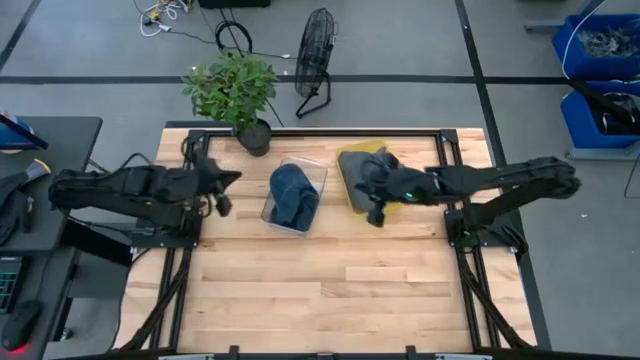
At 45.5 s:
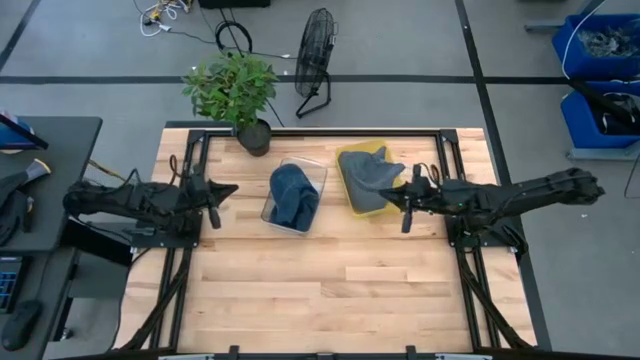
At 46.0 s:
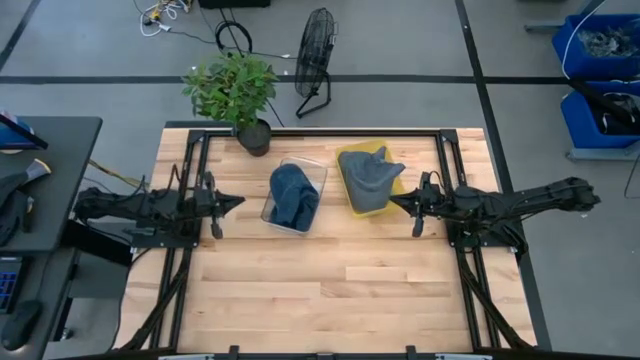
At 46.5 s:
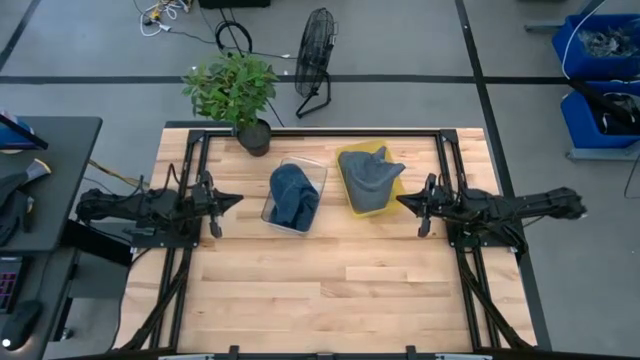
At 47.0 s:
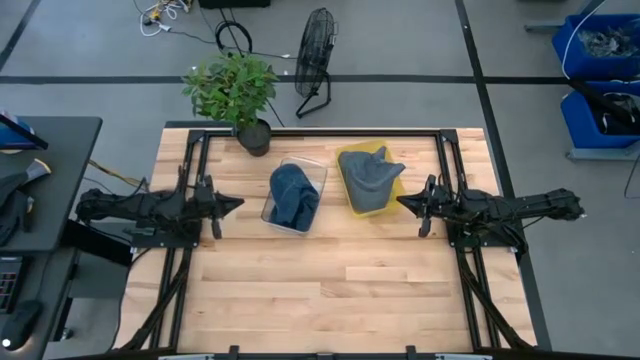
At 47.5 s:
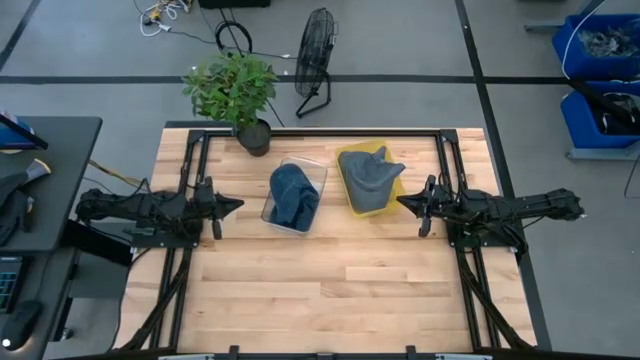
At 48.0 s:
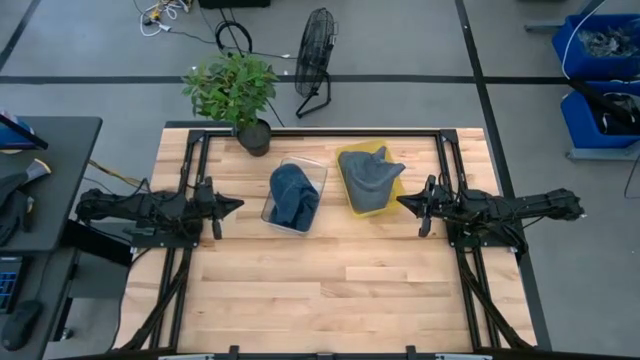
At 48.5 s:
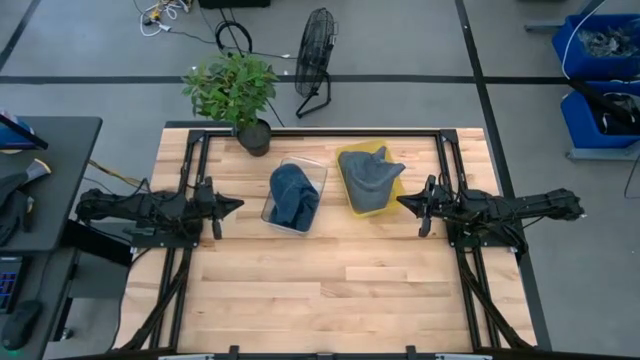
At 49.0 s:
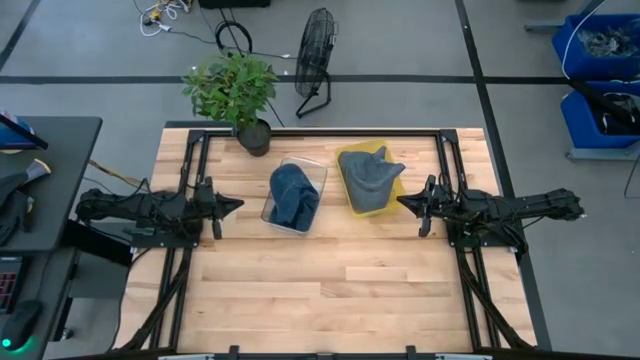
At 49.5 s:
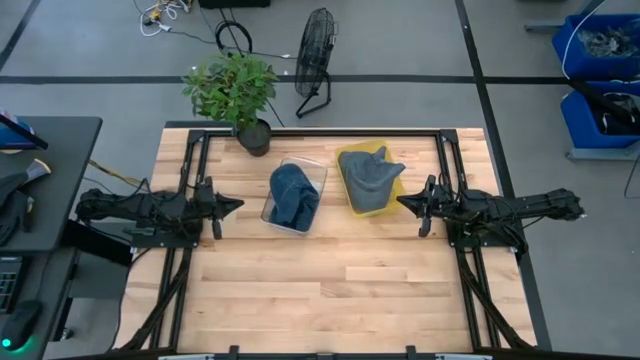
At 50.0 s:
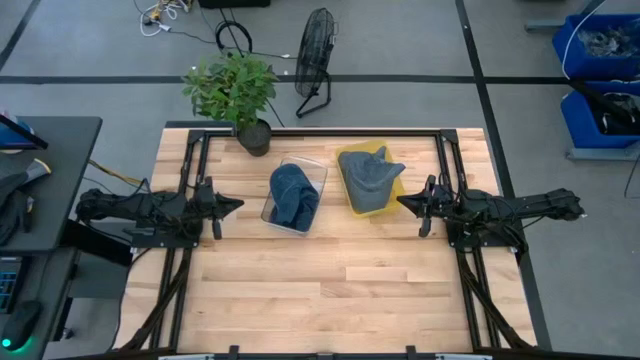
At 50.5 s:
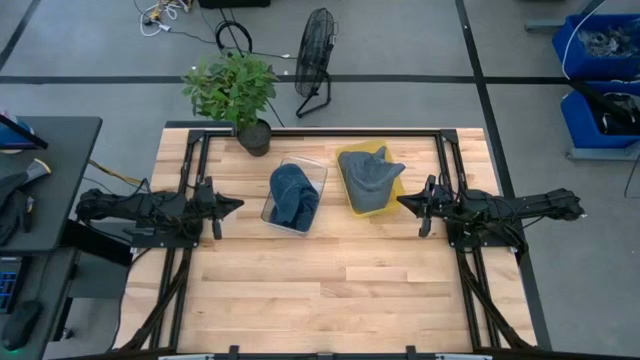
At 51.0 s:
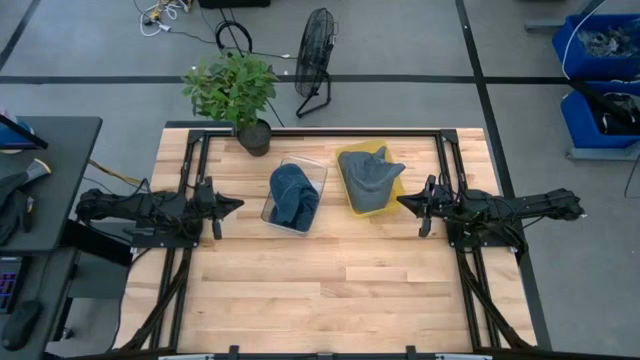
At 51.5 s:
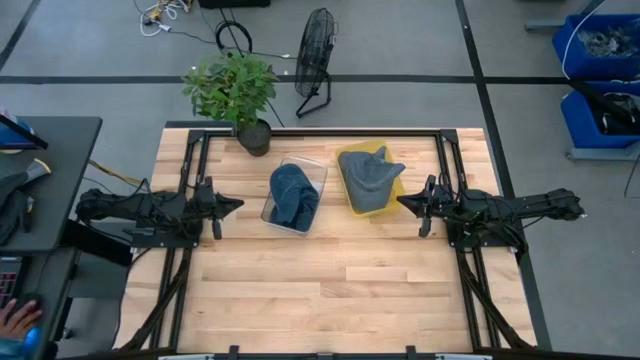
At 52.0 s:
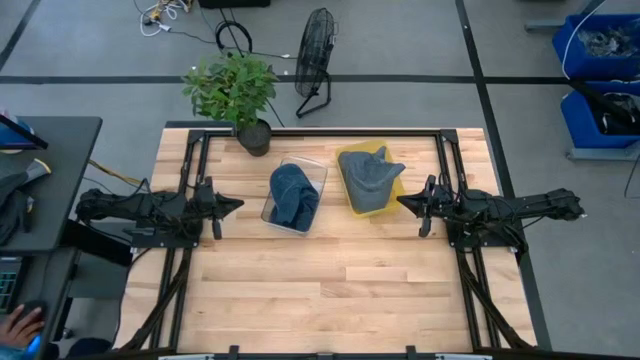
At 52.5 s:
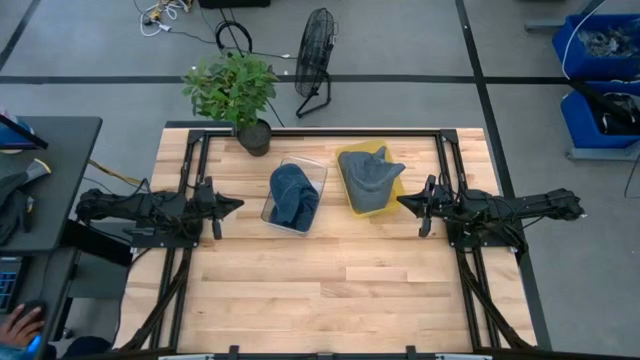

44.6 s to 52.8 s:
Task: Pick & Place hat
Return to Home Position

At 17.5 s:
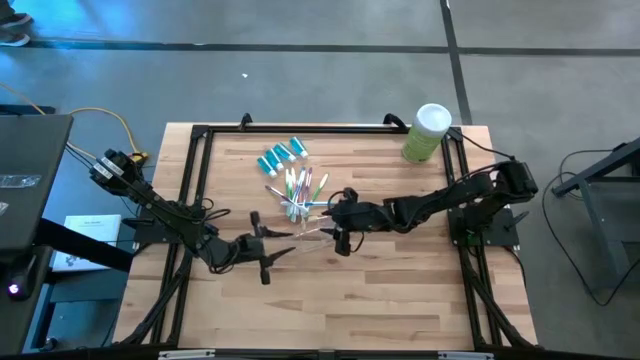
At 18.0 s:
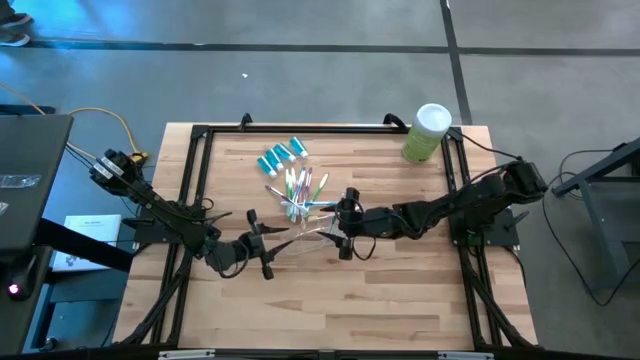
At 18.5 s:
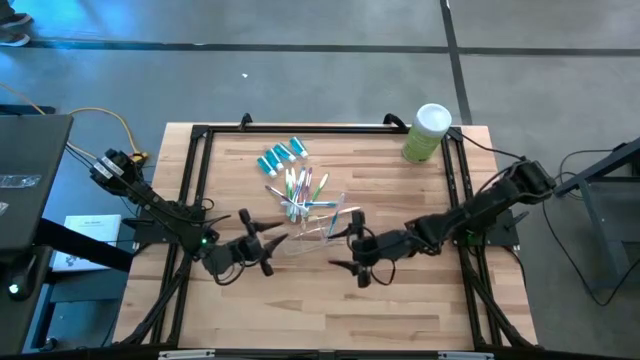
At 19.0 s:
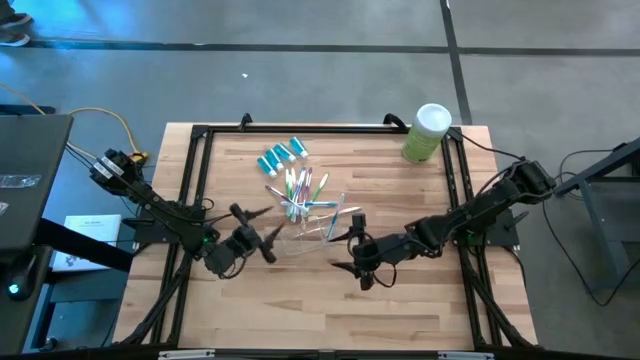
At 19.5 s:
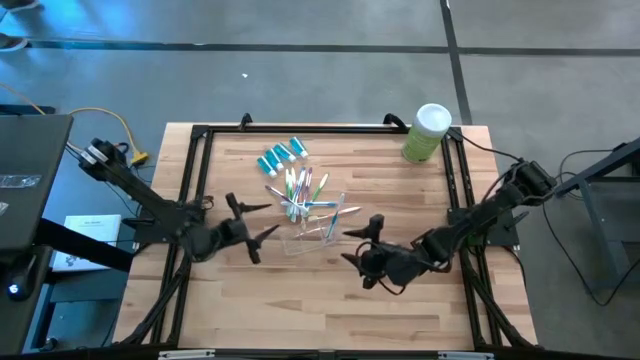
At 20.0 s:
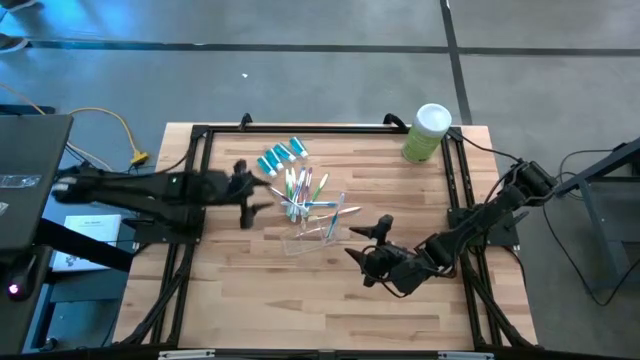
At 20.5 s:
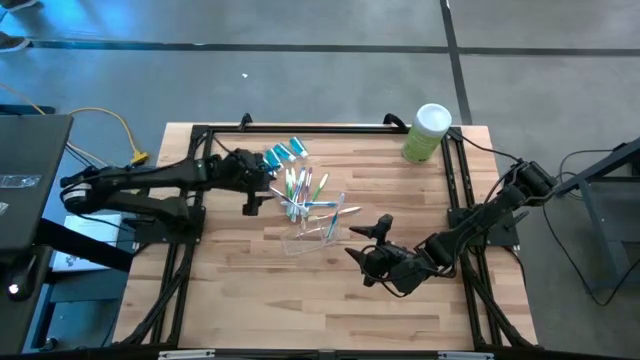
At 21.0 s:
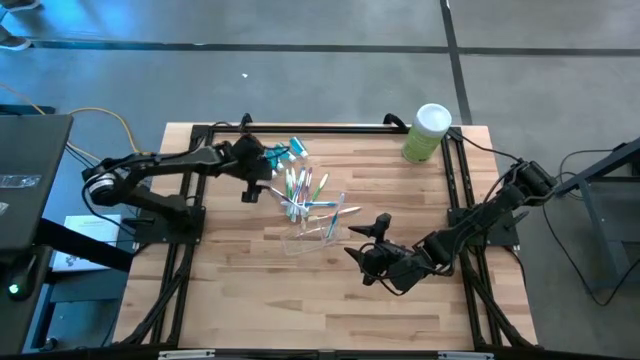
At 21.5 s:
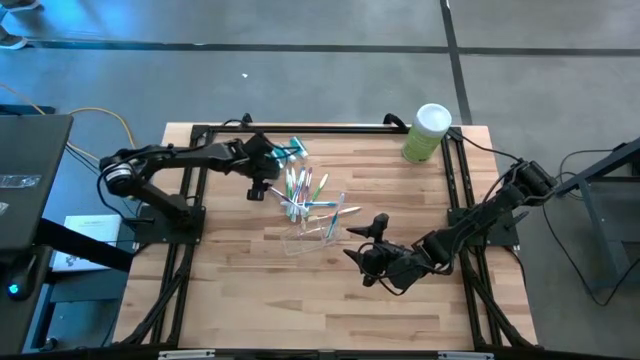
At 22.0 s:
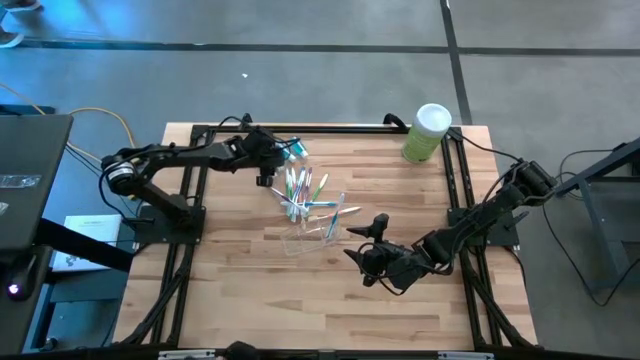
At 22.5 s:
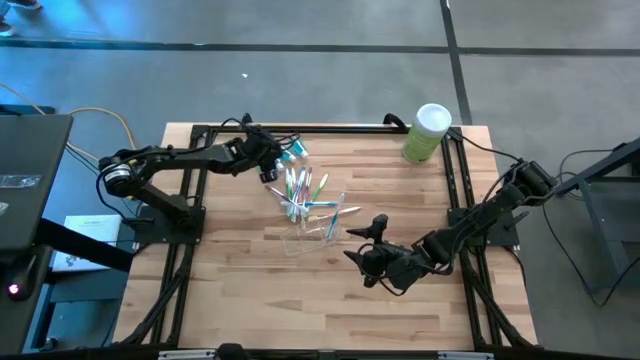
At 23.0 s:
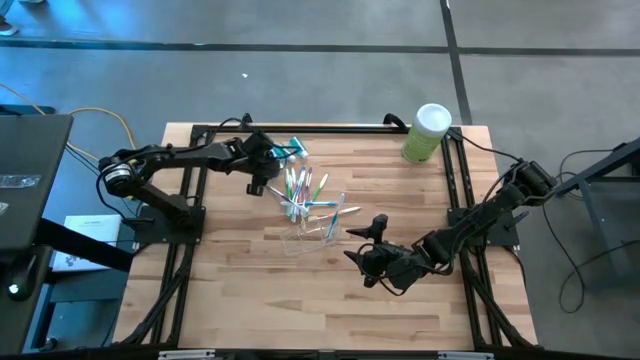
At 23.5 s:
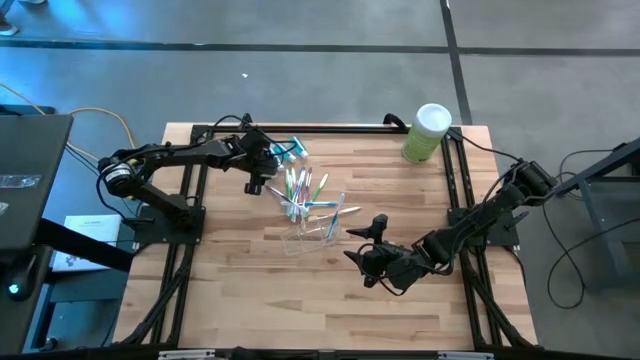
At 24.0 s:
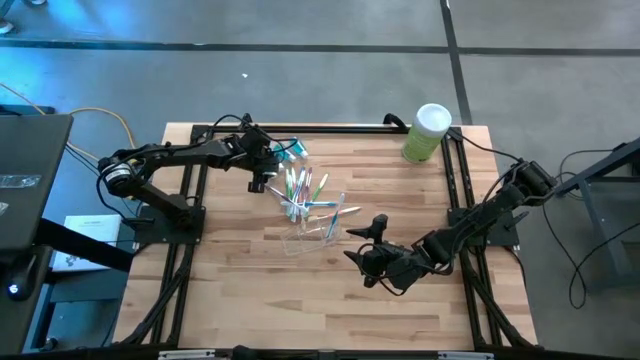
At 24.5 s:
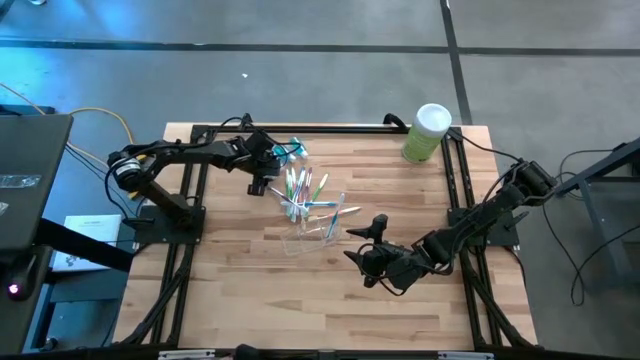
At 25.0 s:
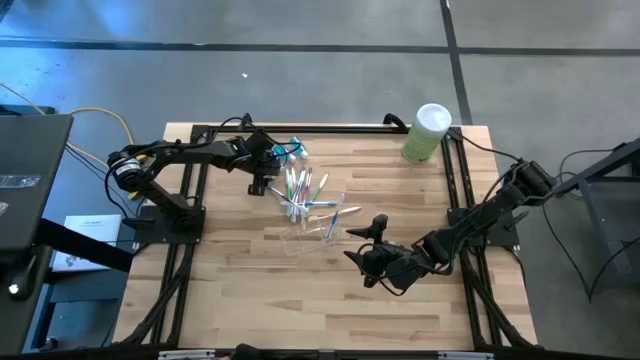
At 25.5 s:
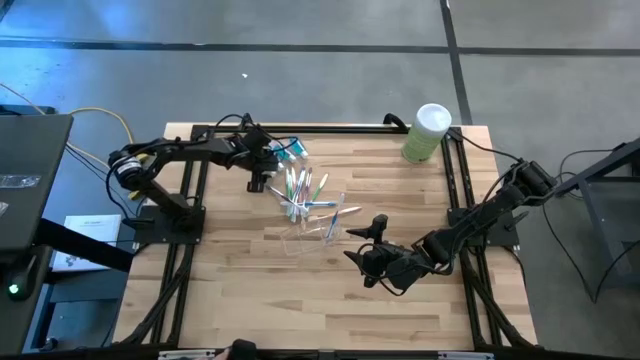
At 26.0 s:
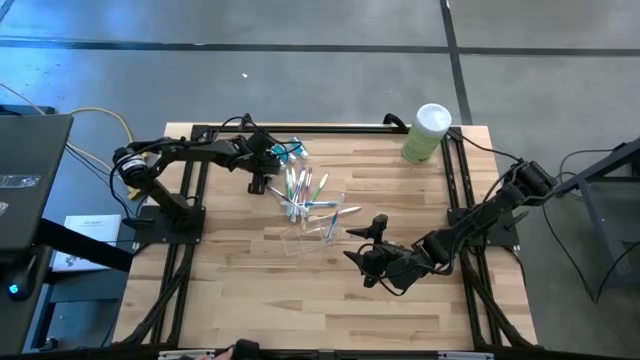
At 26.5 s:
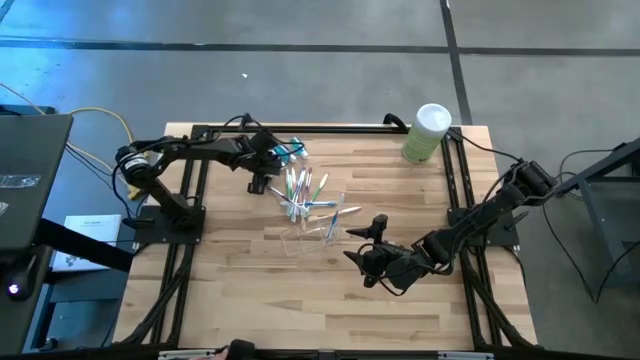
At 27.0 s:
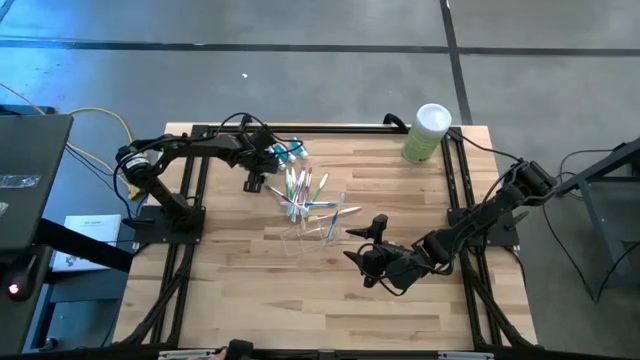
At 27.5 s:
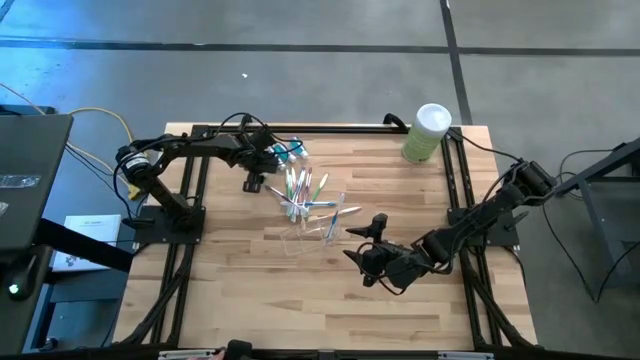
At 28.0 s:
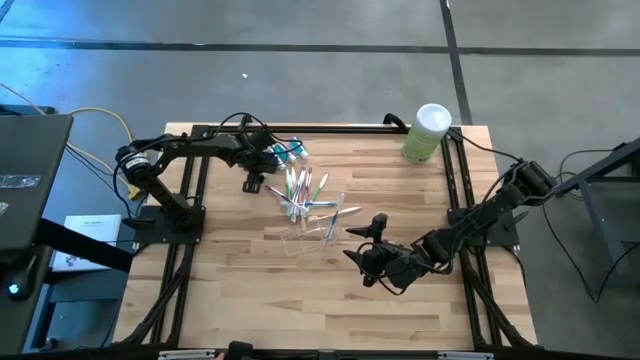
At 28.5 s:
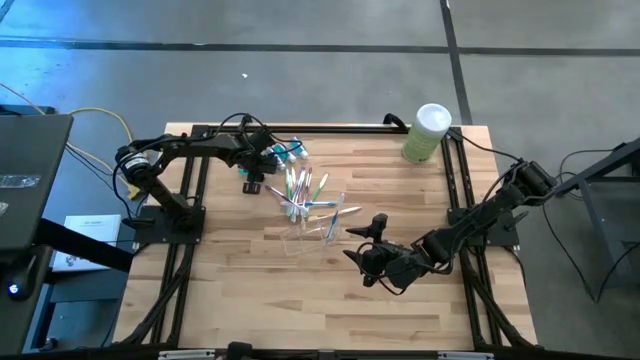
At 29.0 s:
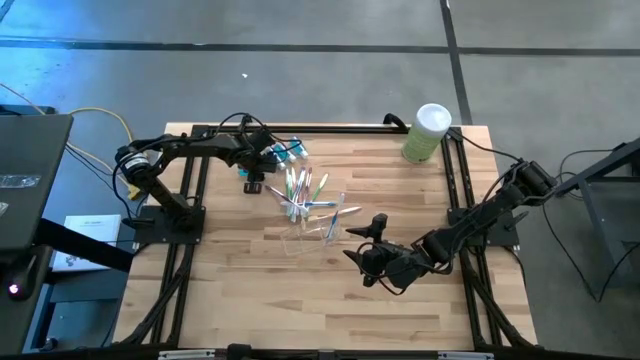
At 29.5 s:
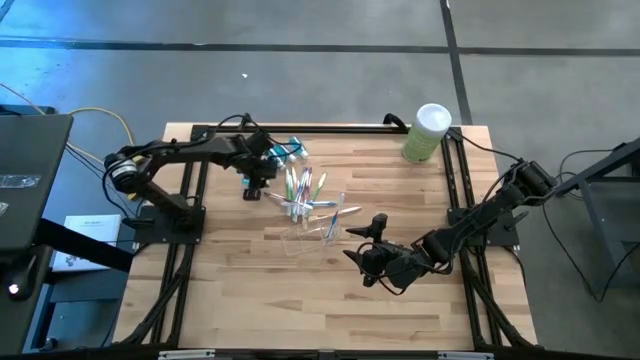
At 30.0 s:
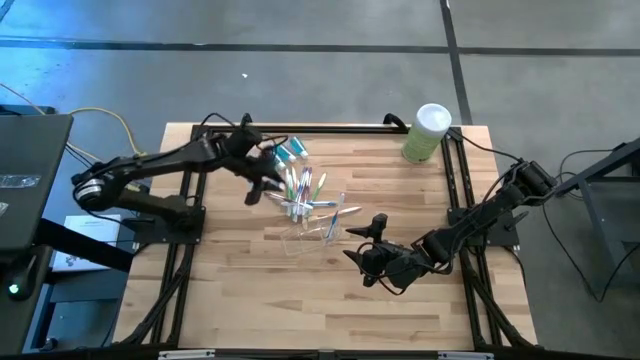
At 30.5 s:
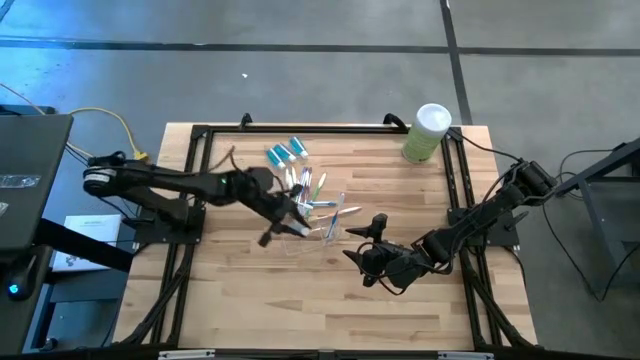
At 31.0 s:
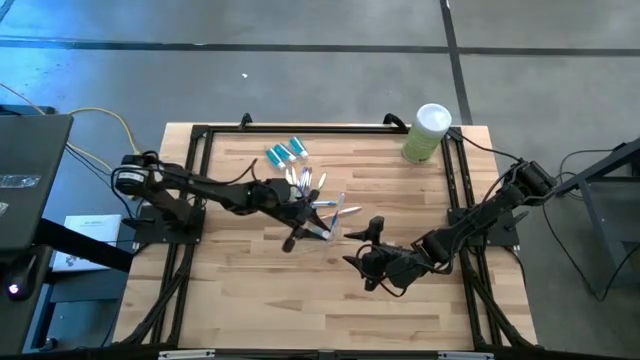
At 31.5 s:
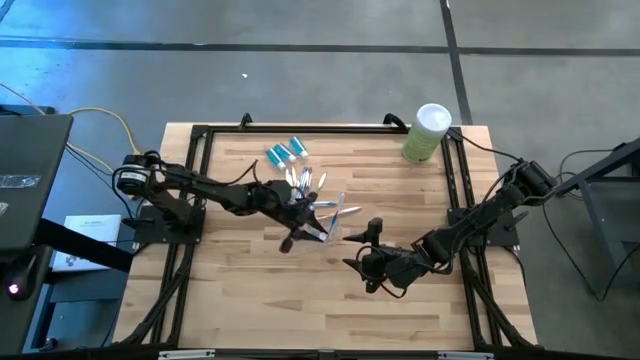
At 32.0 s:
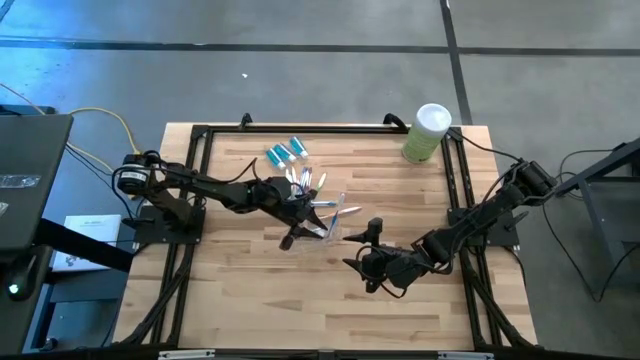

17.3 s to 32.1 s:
Task: Pick & Place toothbrushing station
Put the blue mouthwash into the transparent organizer
